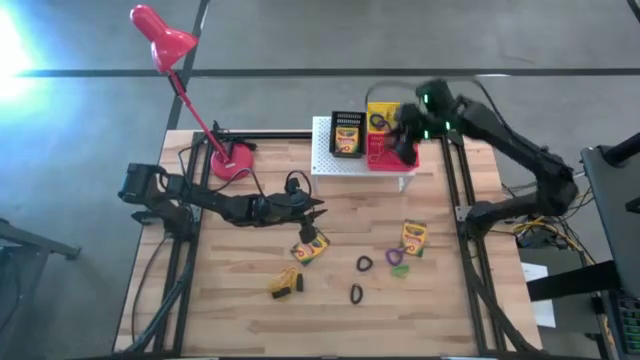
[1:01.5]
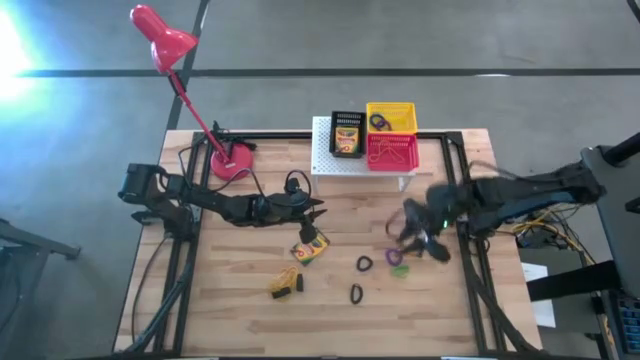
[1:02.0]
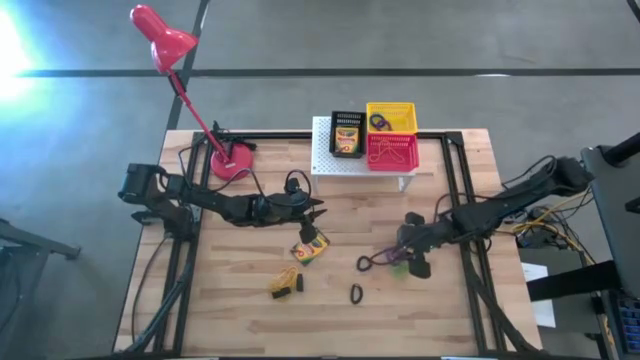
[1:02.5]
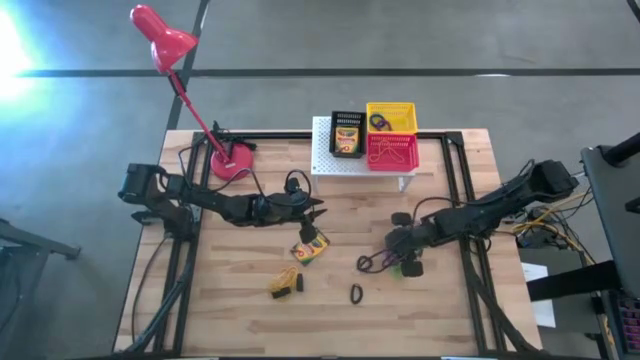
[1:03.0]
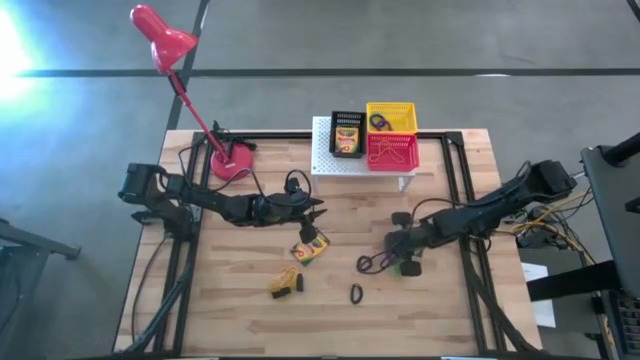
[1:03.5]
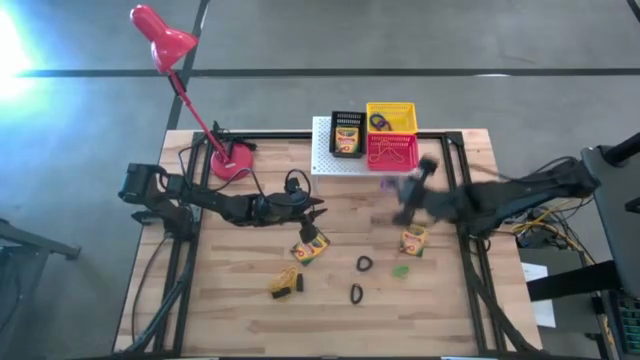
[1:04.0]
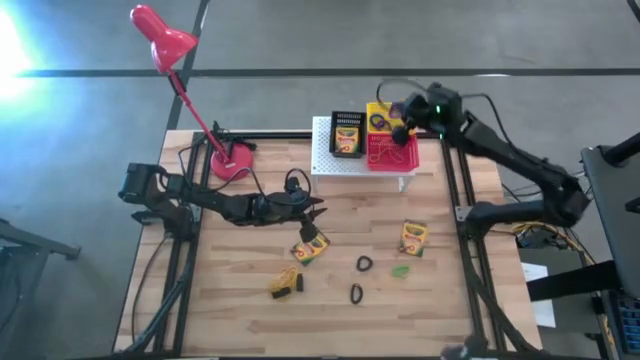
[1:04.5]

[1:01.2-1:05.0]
Task: Pick & Place Office Desk Supplies
Put the violet spring keychain into the yellow basket on the shelf

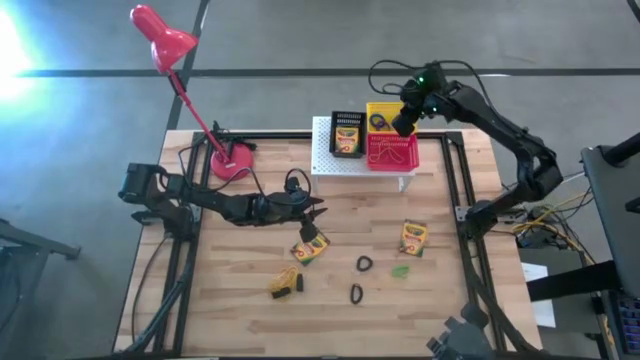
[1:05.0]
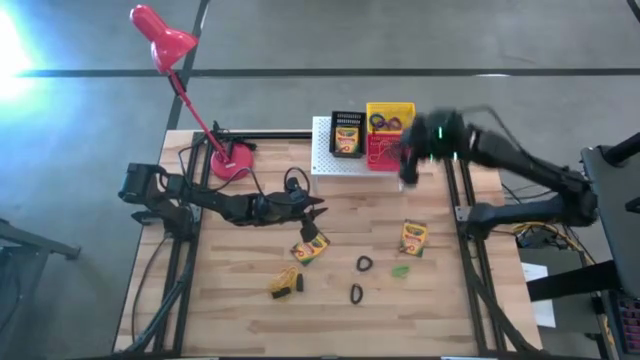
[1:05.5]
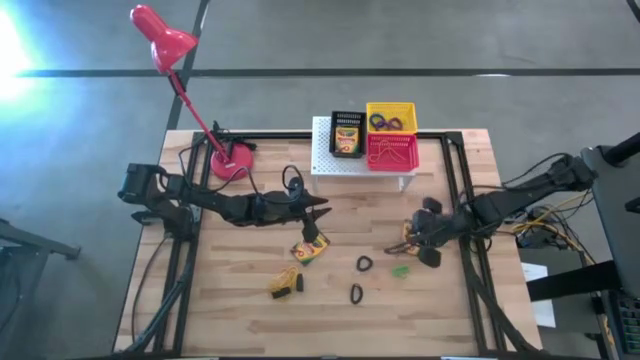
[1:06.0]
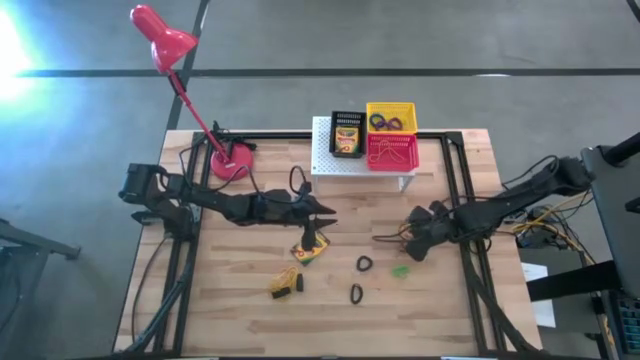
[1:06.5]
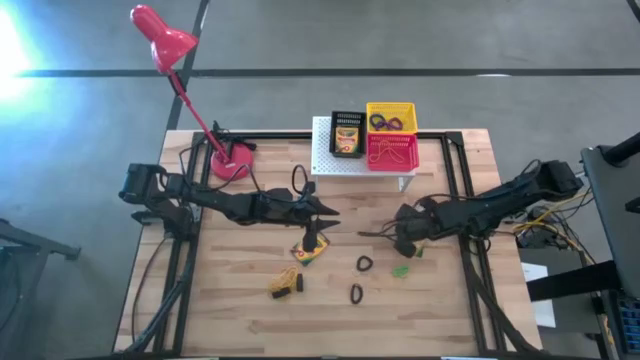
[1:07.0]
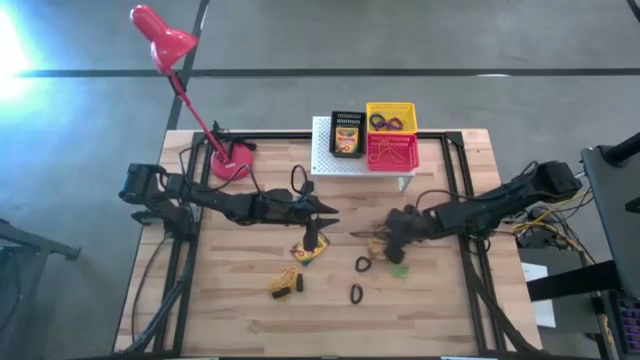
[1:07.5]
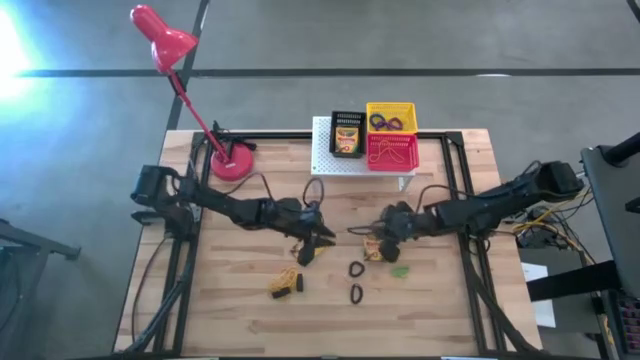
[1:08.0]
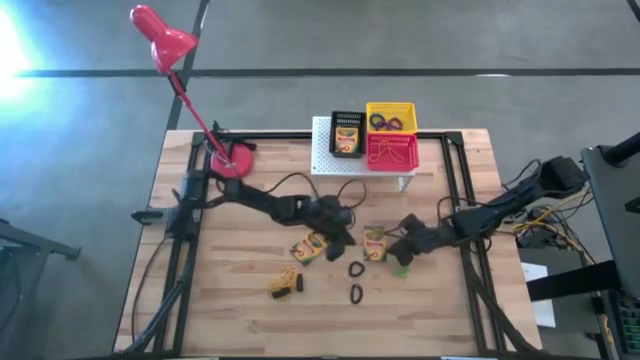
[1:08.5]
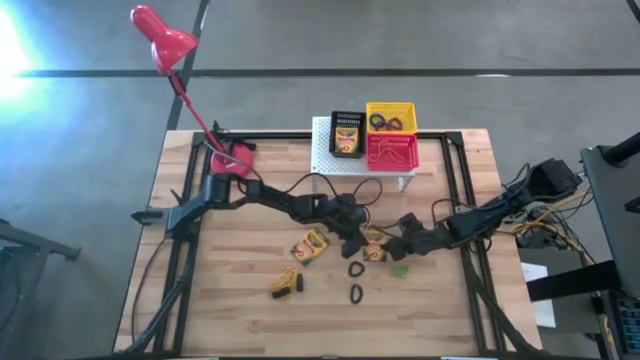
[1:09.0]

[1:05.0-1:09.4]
Put the right crayon box into the black basket on the shelf

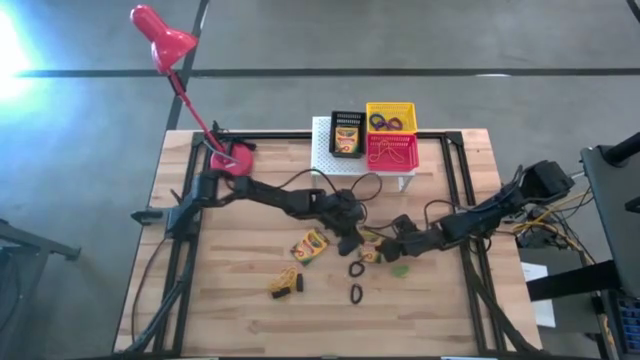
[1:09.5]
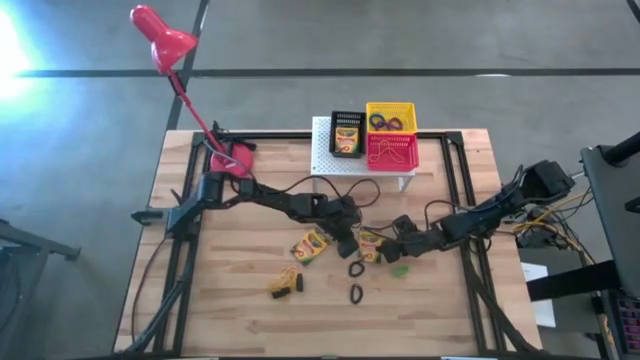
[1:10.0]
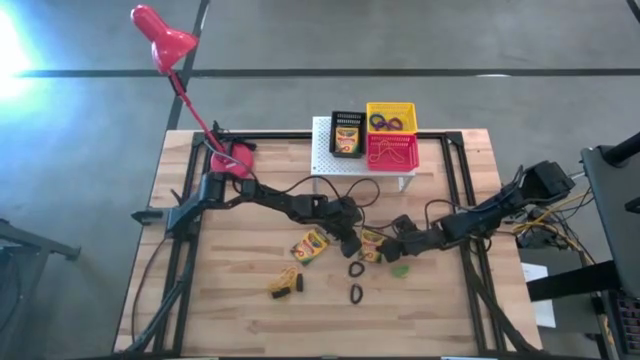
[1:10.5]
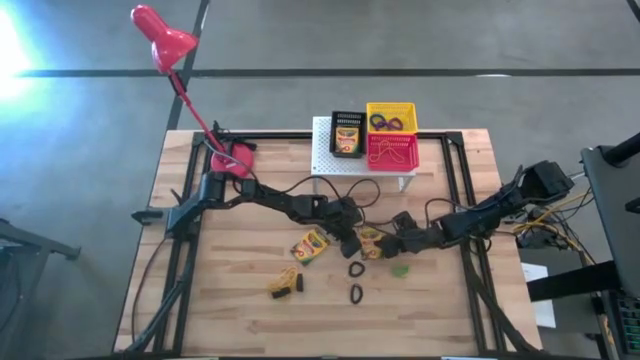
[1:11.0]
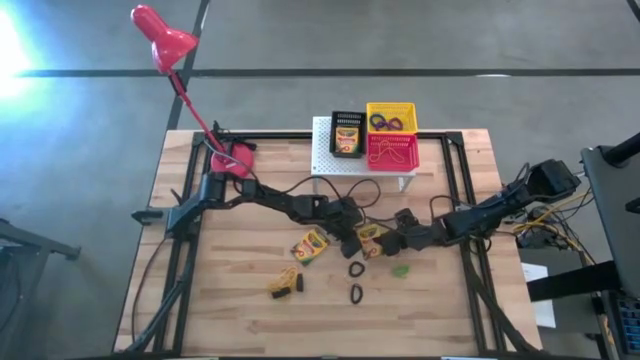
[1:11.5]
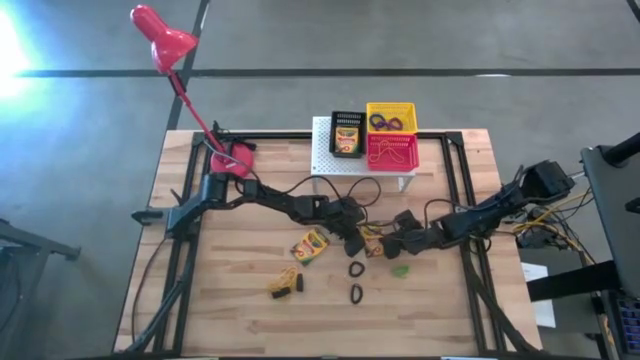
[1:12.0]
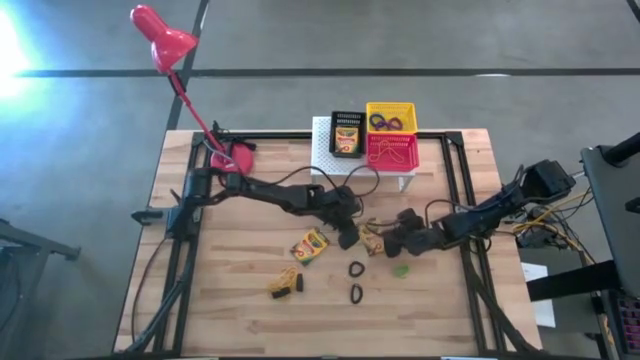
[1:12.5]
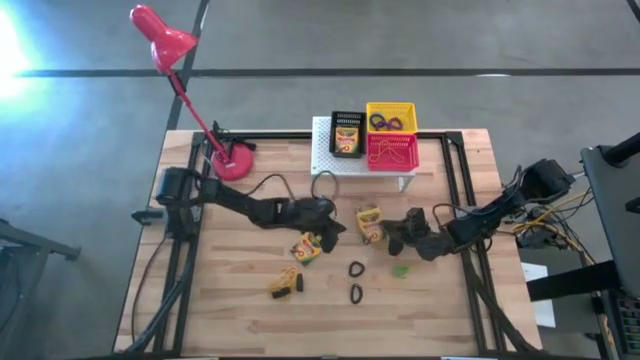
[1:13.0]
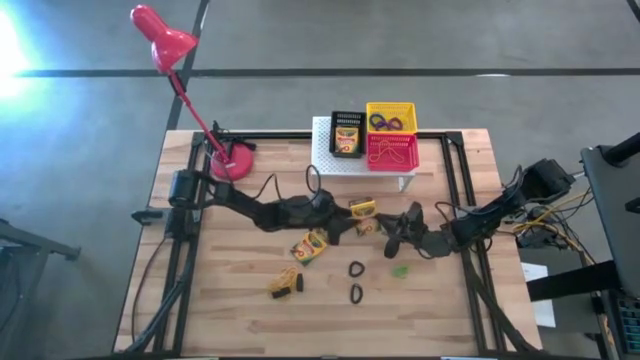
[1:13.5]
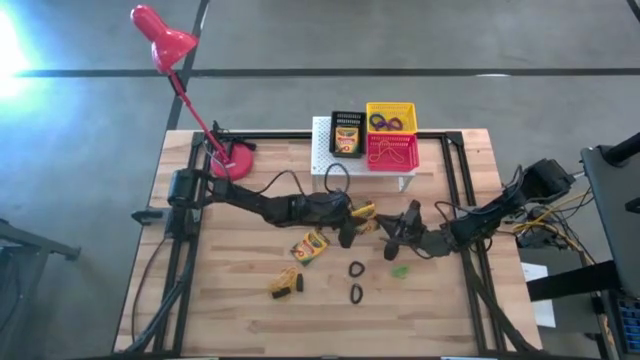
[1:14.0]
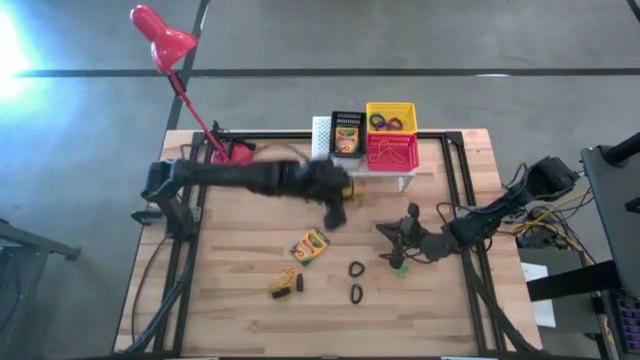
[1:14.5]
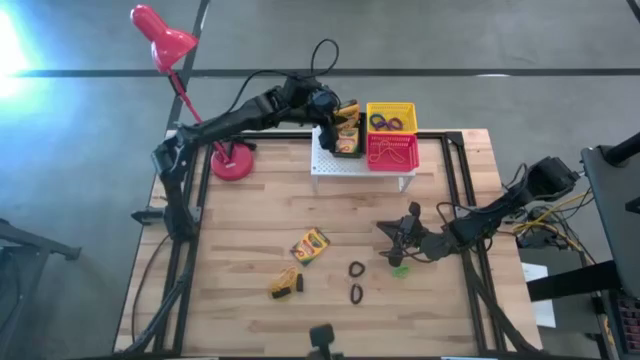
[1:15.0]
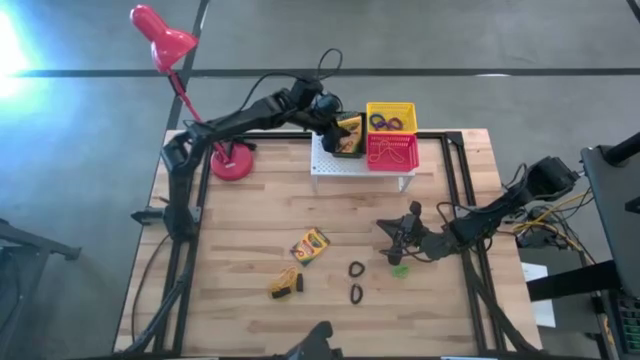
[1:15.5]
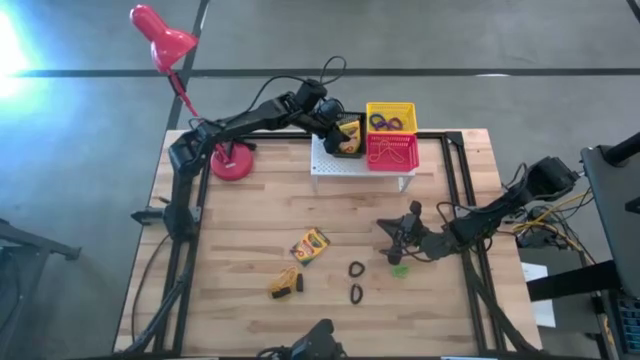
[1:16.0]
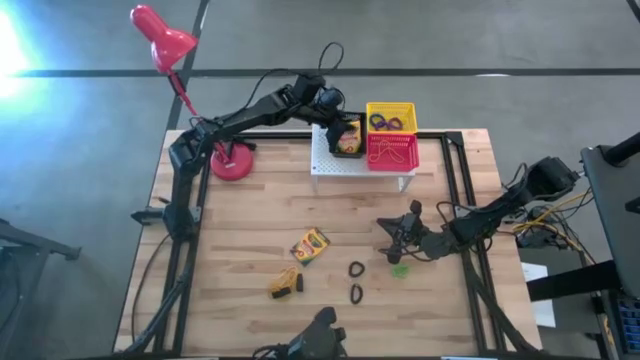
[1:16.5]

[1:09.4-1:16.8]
Put the right crayon box into the black basket on the shelf

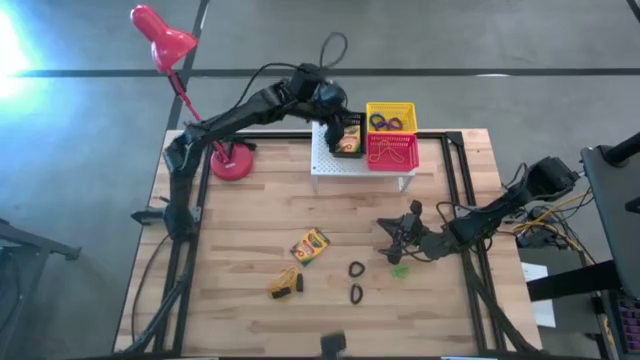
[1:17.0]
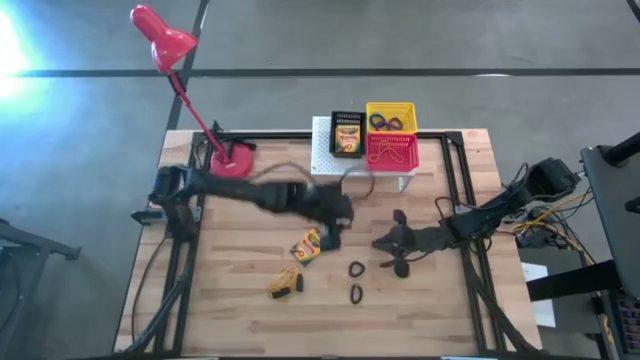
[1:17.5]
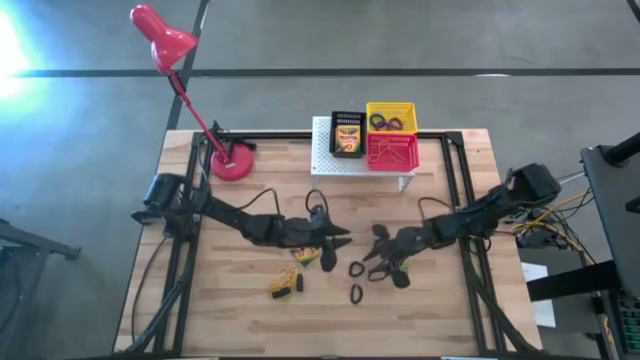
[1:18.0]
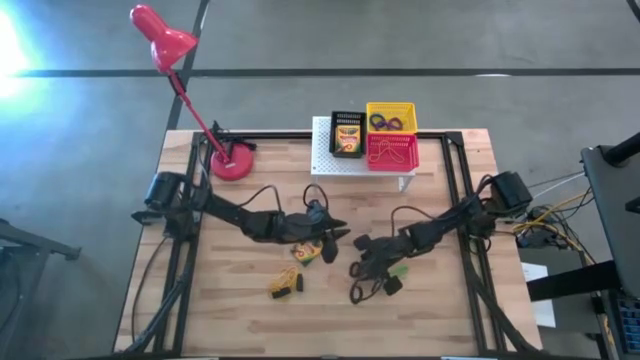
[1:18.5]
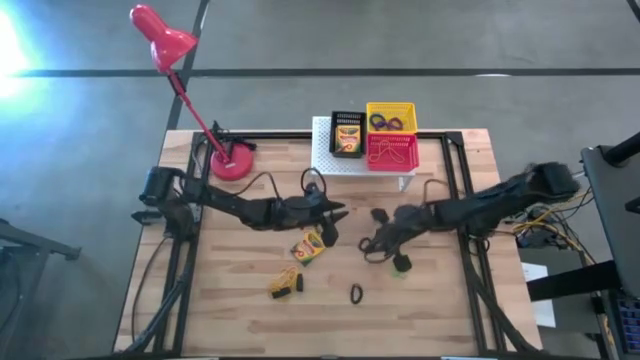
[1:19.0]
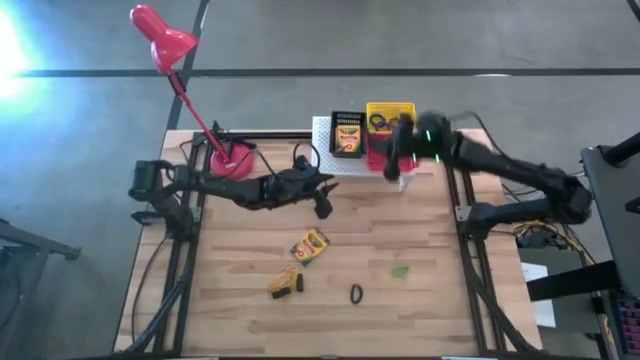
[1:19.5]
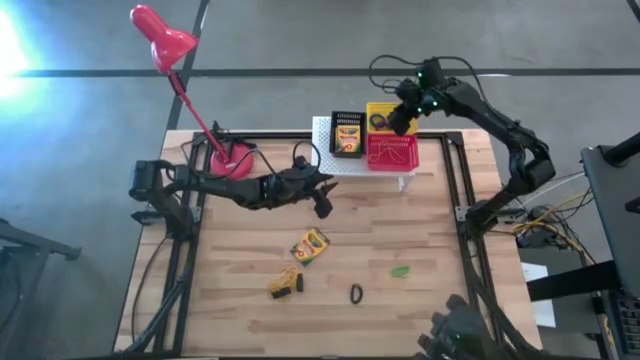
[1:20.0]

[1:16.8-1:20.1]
Put the top black spring keychain into the yellow basket on the shelf

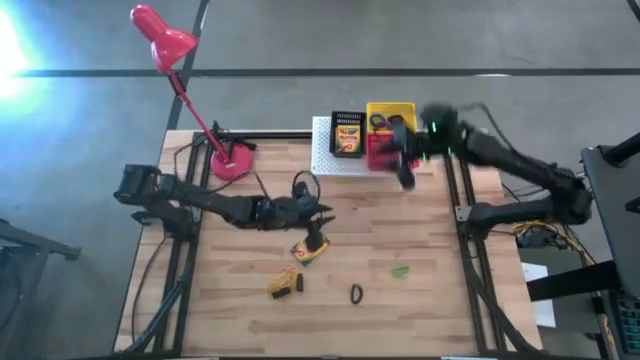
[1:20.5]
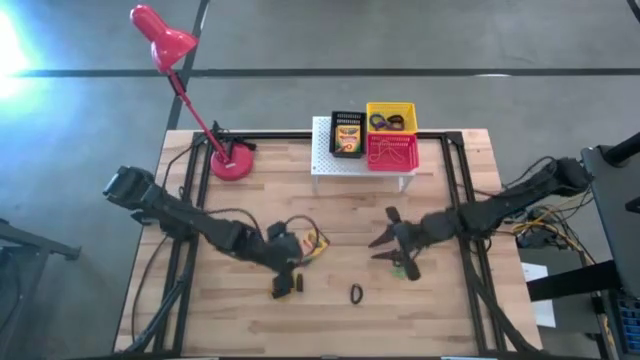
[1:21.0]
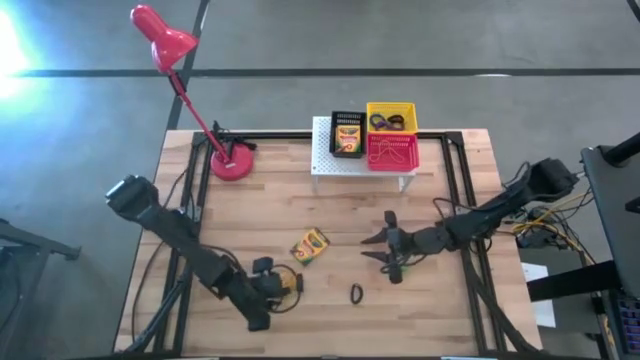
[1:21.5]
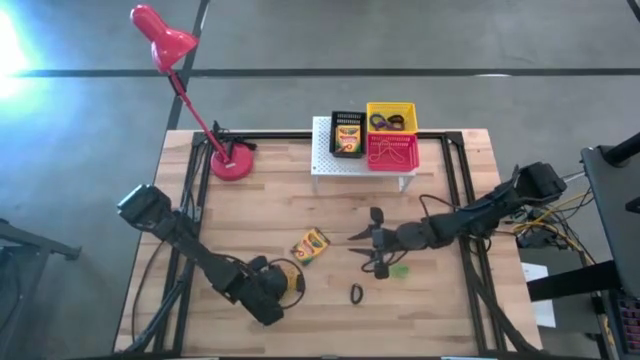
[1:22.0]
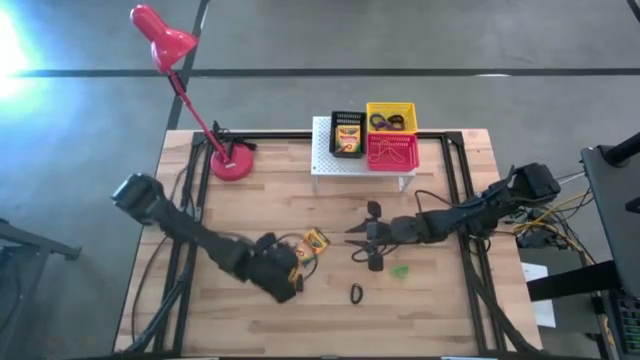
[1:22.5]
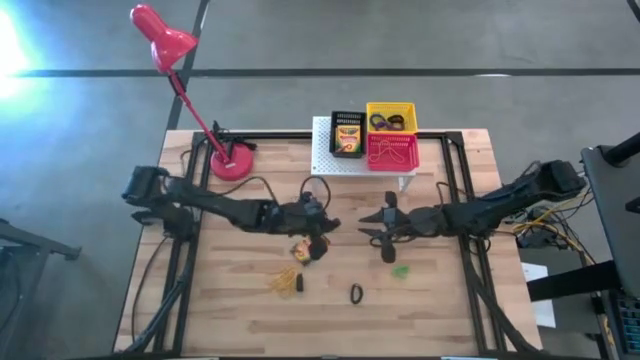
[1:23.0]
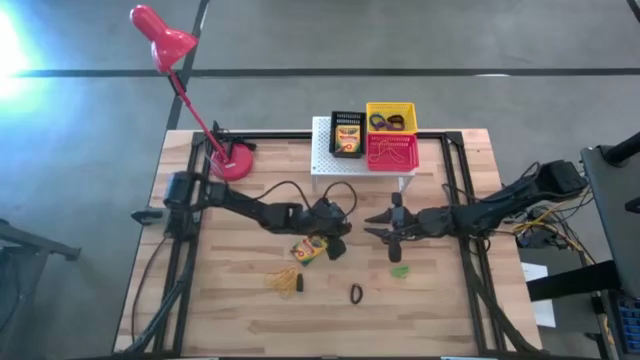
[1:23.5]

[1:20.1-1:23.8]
Put the yellow rubber band into the red basket on the shelf
